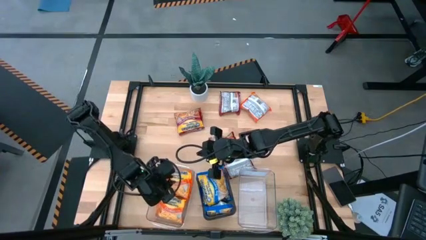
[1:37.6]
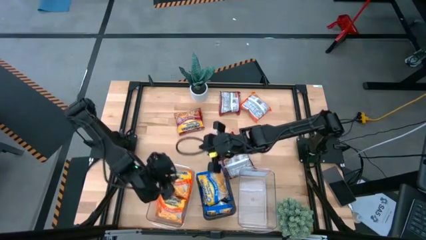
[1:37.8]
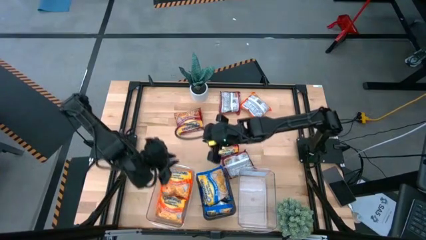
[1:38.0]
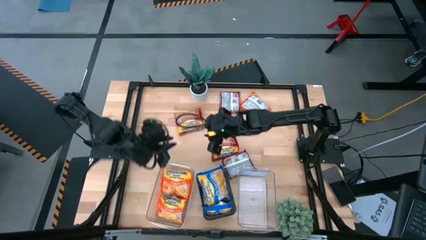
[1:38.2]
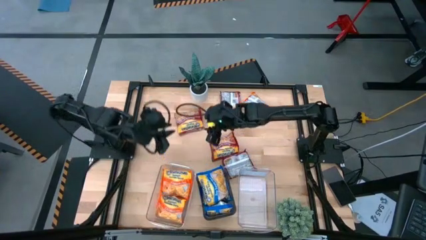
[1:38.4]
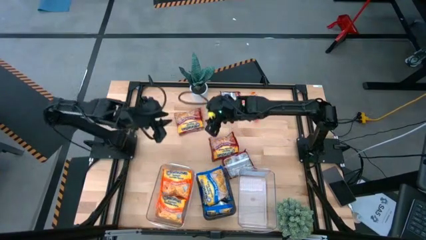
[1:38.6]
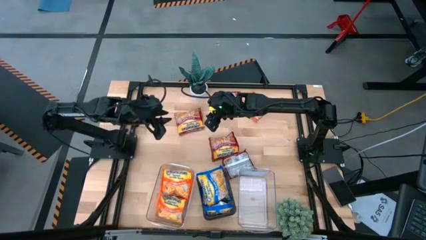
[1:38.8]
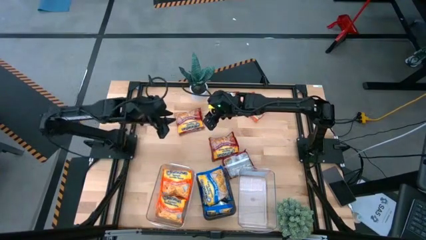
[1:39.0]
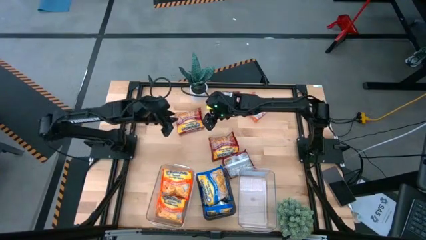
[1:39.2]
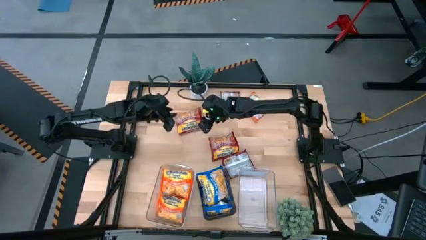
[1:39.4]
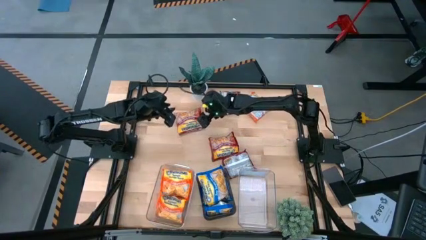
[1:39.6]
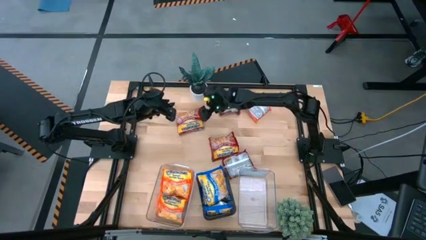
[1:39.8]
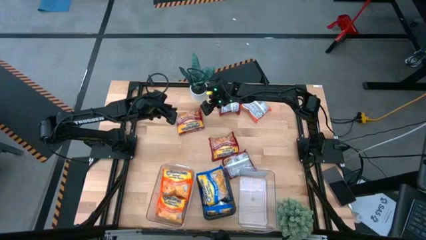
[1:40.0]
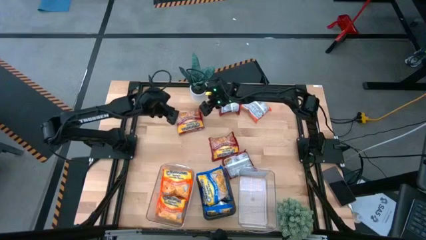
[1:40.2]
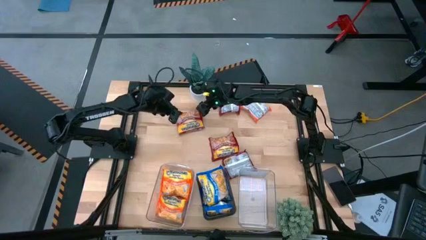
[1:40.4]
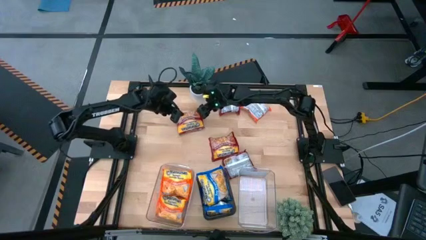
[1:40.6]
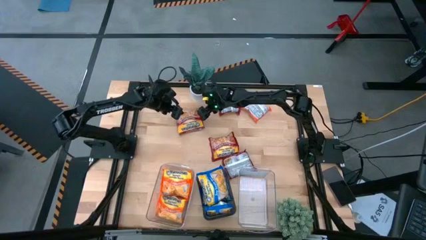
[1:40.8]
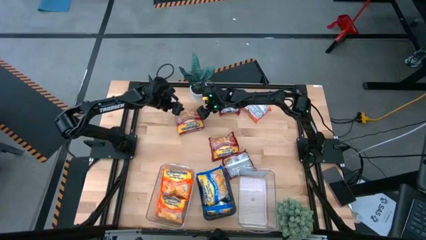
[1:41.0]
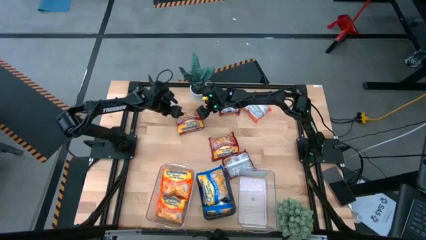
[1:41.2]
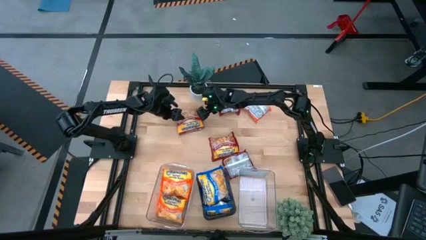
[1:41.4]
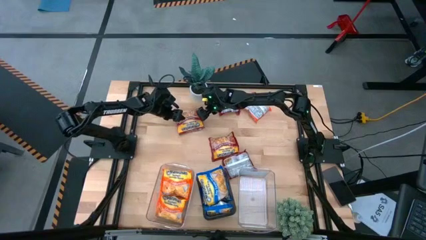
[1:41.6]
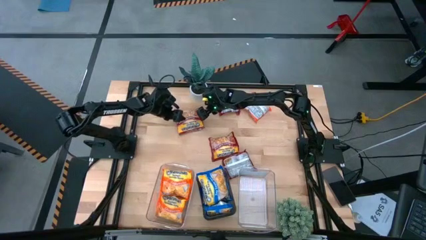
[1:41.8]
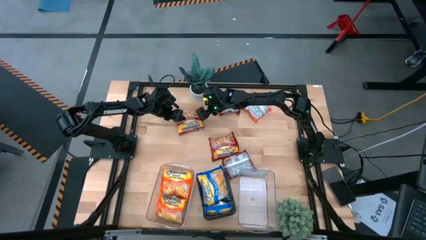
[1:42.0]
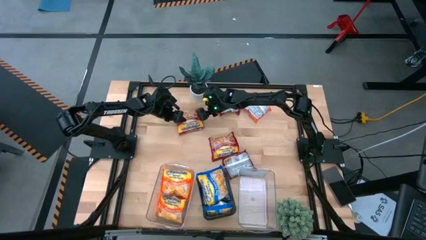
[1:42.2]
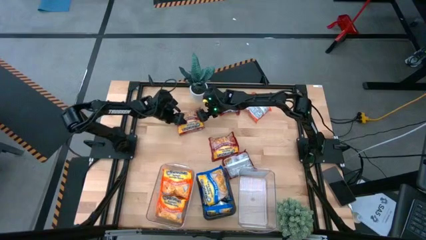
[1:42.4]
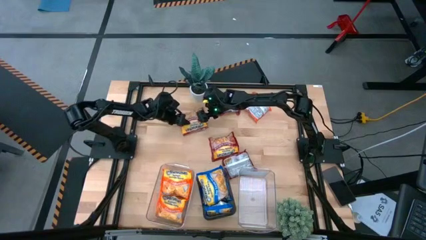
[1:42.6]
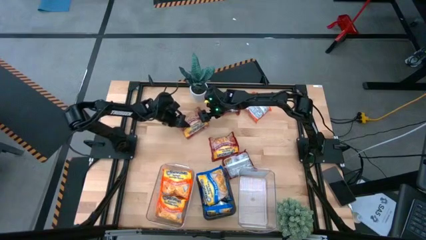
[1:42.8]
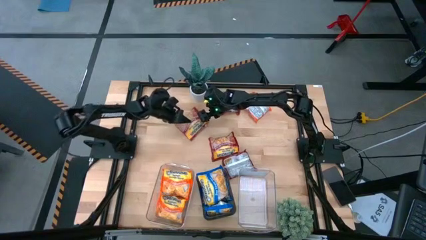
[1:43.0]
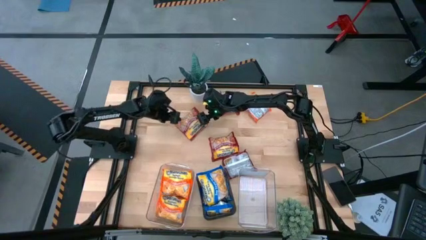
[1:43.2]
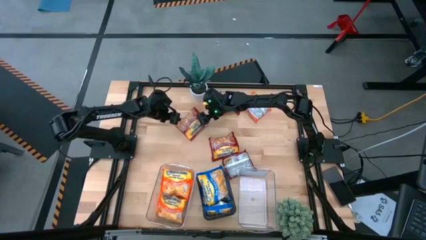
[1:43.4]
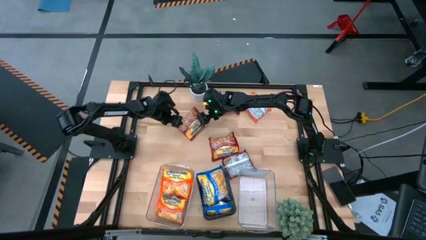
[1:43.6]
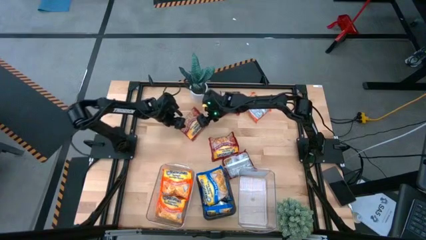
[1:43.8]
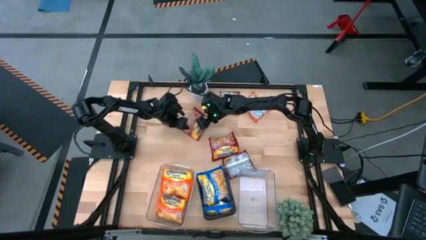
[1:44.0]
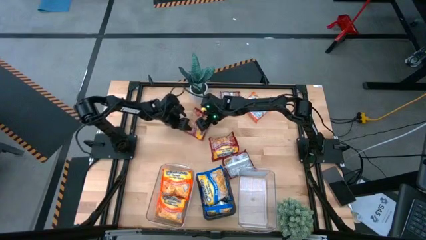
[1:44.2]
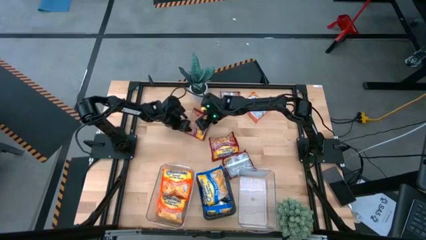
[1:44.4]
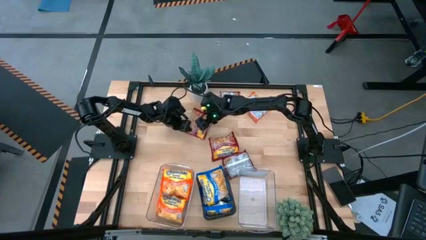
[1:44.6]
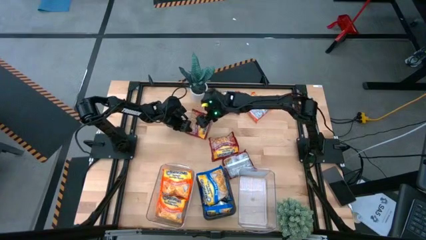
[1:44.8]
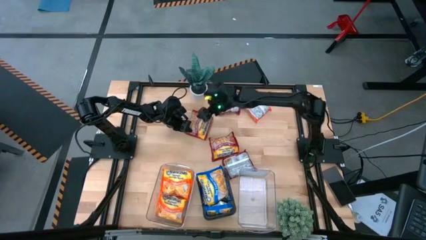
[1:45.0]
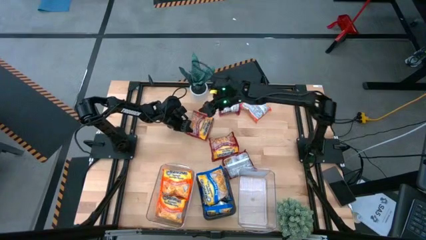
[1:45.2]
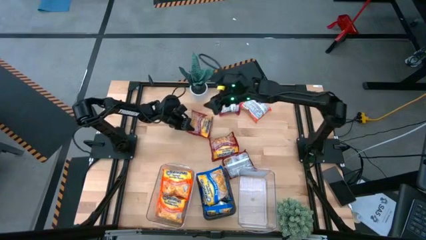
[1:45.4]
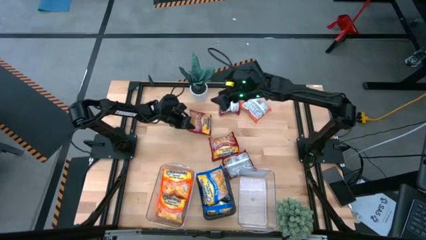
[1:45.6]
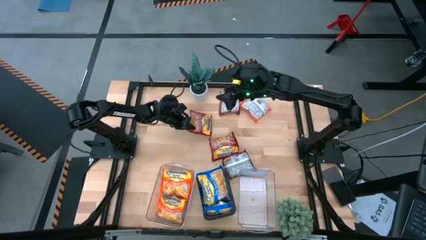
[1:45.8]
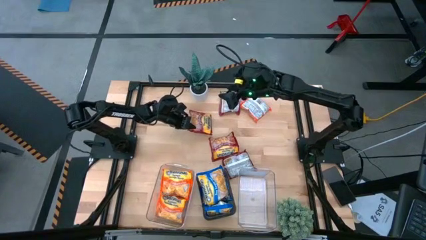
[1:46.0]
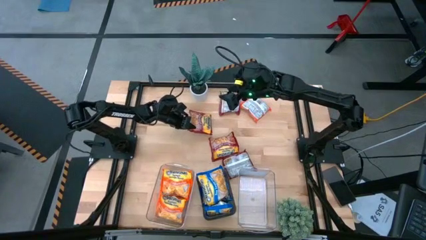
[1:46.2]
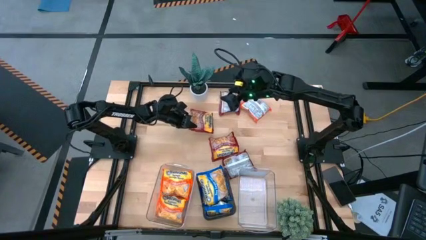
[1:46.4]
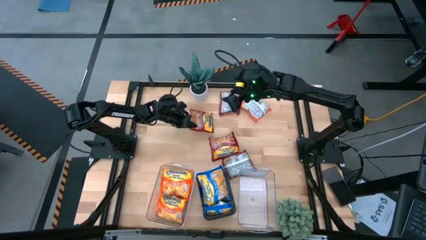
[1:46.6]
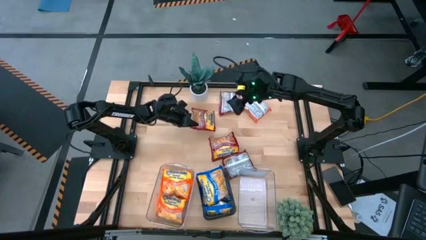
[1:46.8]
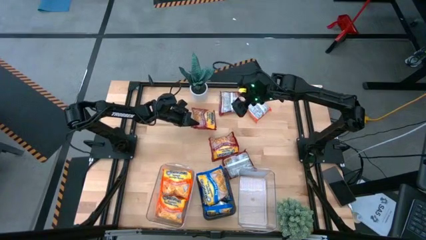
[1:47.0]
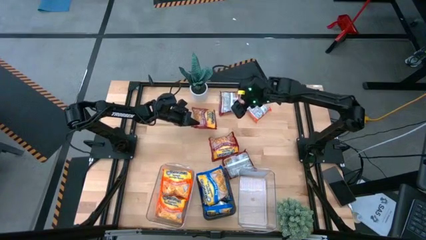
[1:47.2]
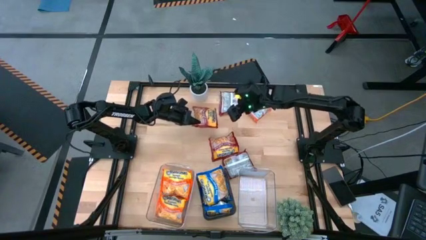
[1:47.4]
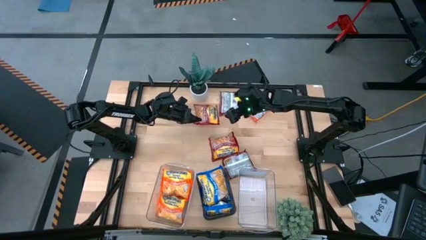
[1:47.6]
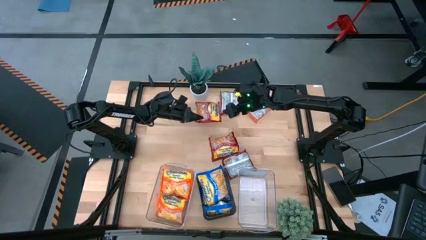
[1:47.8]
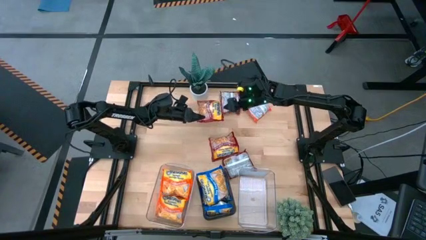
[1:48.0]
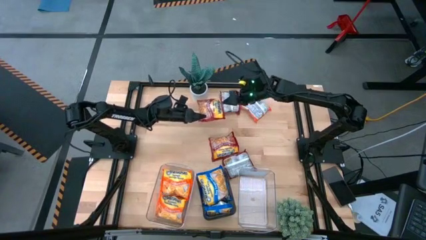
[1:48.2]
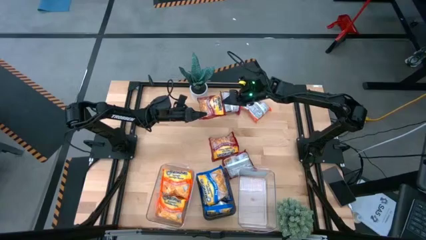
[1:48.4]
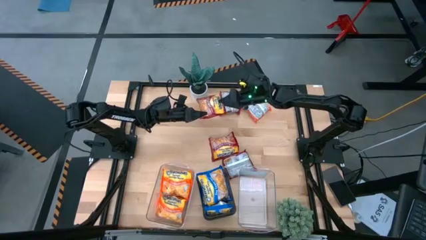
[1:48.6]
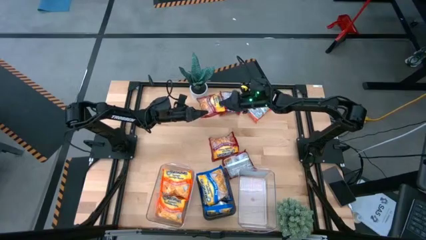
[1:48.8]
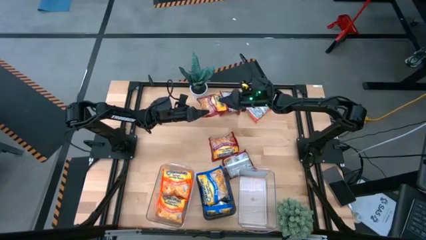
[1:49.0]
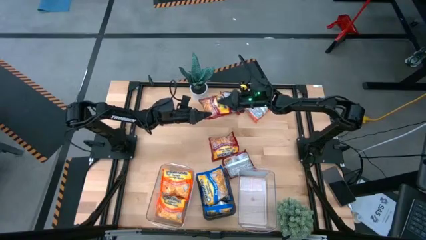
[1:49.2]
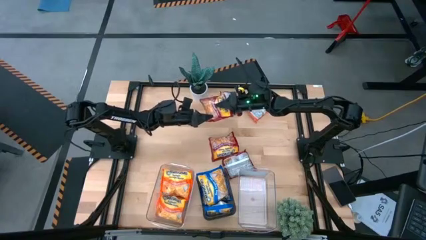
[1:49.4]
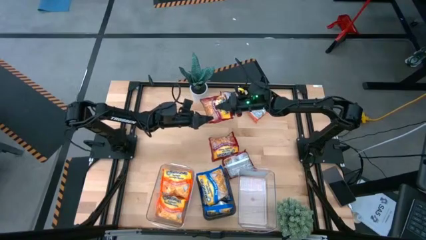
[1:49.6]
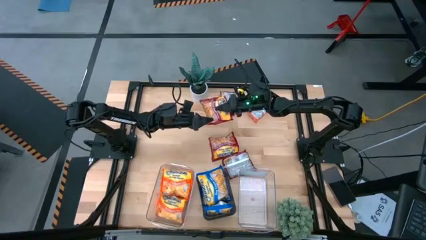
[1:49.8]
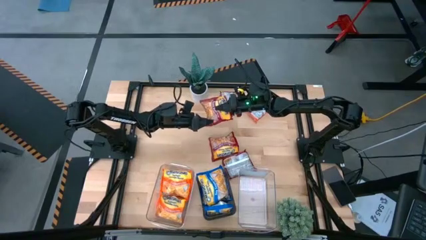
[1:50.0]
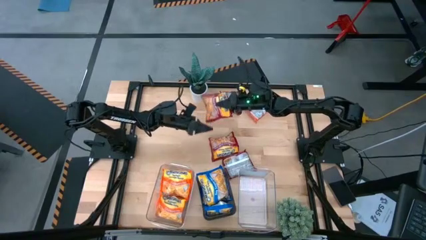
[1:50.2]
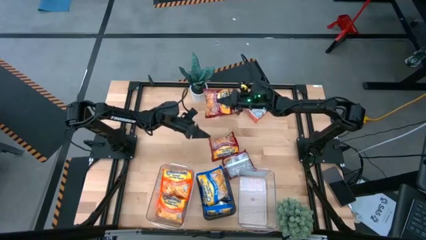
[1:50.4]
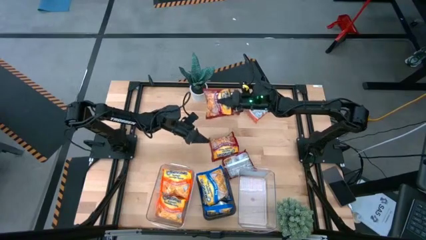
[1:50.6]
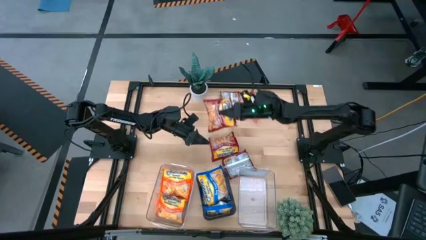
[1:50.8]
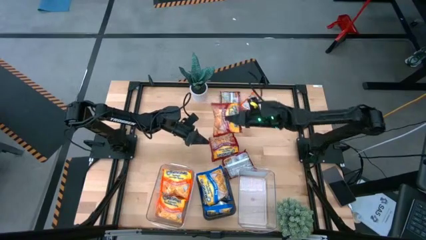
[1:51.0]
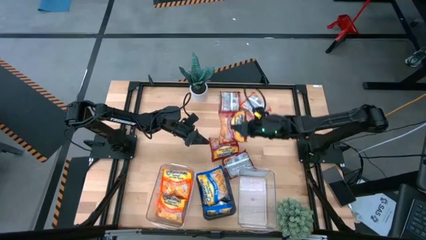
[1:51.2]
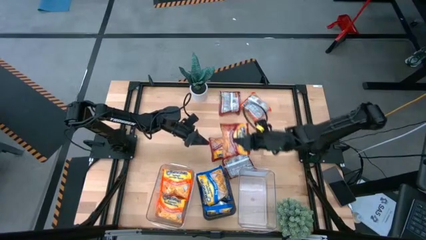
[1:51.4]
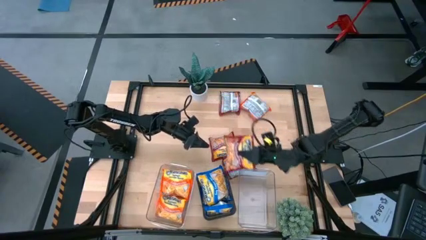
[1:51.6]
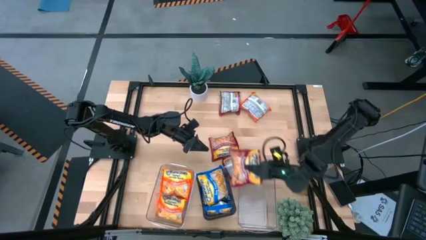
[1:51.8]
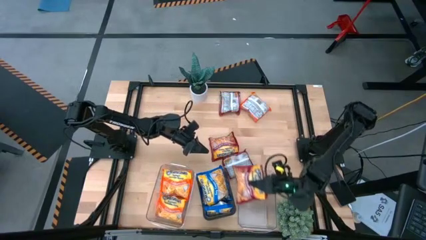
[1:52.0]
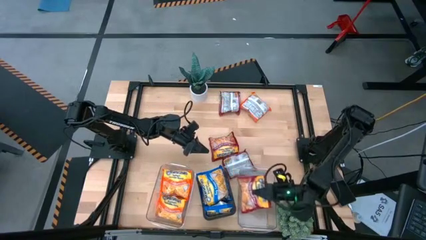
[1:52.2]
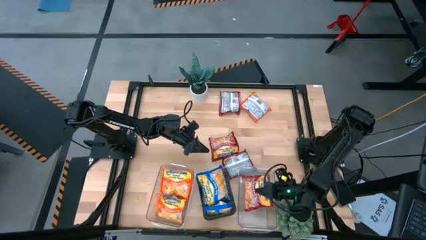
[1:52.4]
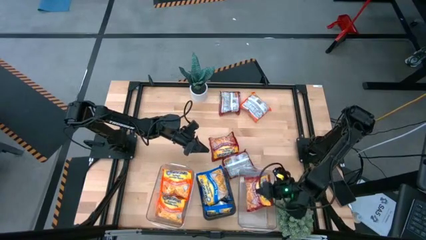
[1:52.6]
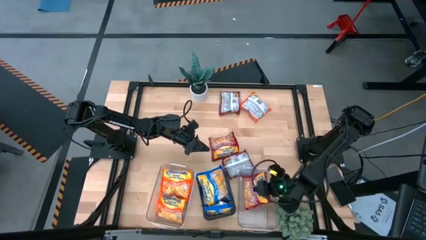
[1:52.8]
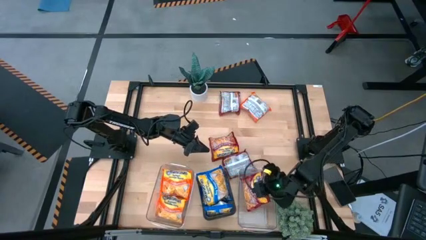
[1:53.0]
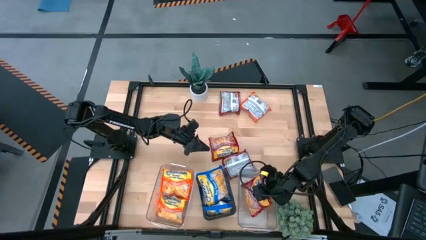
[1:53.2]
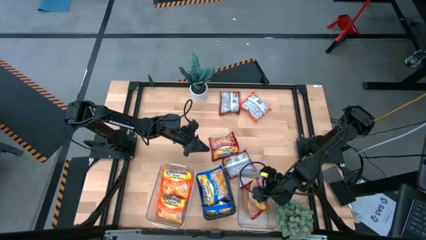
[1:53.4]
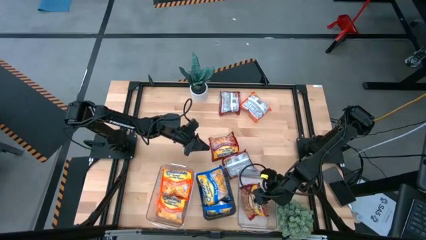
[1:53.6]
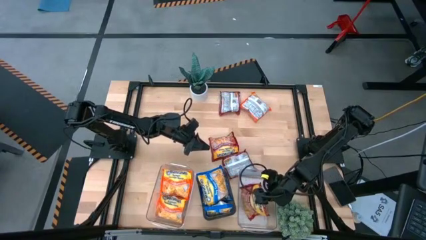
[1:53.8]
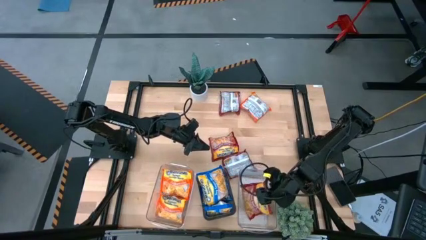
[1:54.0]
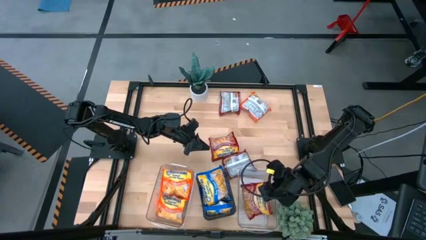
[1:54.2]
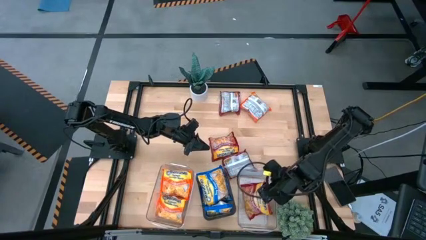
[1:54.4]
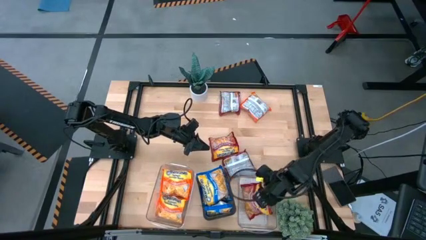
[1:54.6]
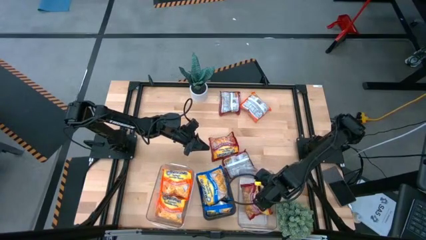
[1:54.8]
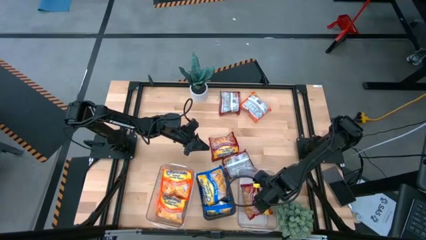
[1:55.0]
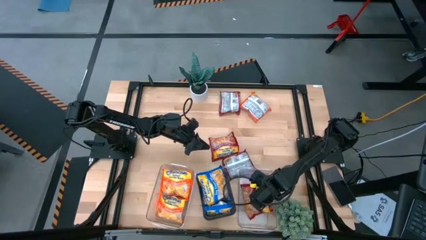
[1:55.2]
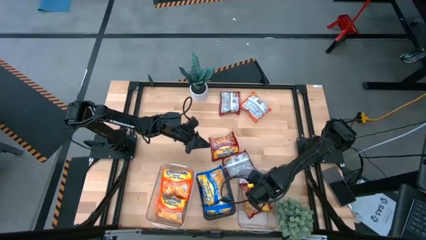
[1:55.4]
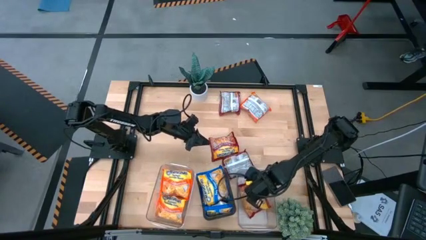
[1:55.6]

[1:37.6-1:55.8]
Task: Sort Maruchan noodles
Put the red noodle pack into the right transparent bin
